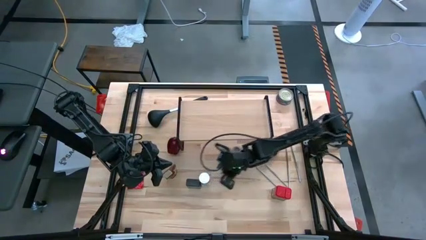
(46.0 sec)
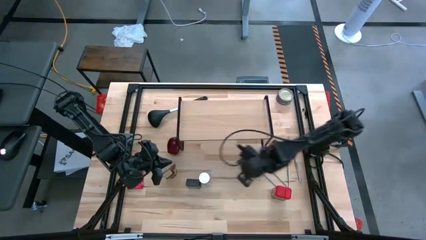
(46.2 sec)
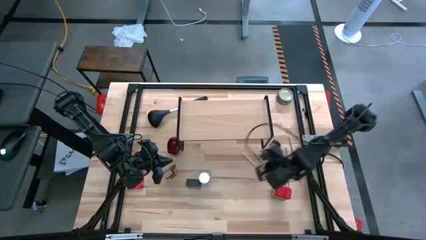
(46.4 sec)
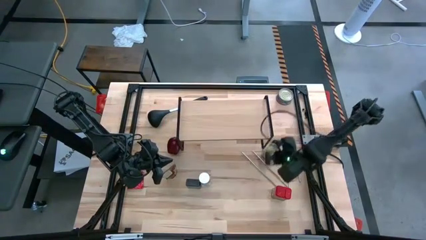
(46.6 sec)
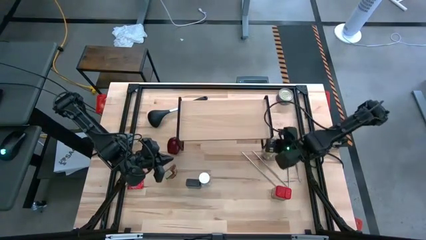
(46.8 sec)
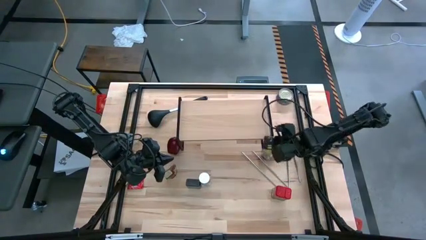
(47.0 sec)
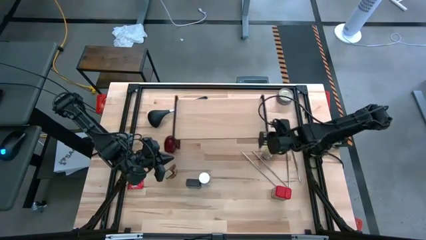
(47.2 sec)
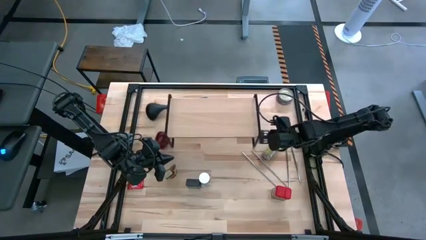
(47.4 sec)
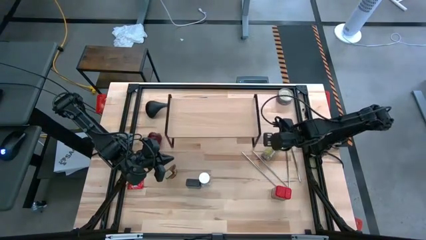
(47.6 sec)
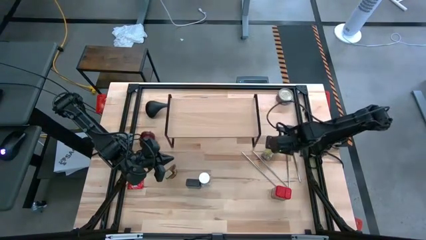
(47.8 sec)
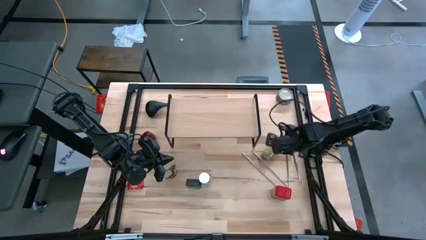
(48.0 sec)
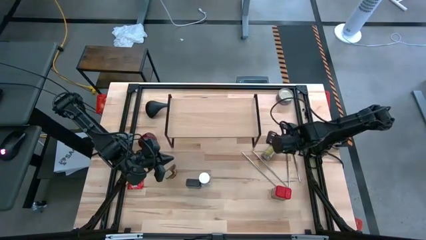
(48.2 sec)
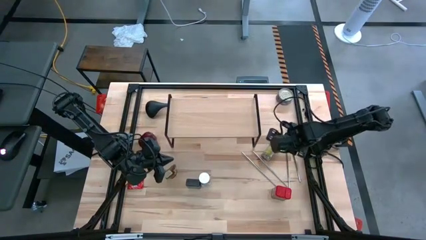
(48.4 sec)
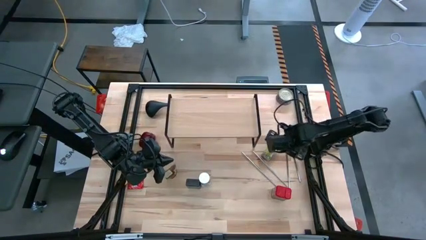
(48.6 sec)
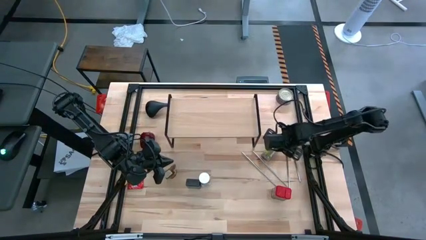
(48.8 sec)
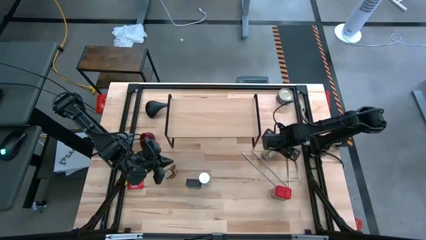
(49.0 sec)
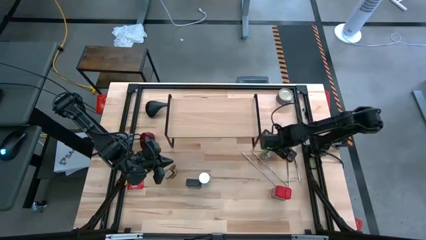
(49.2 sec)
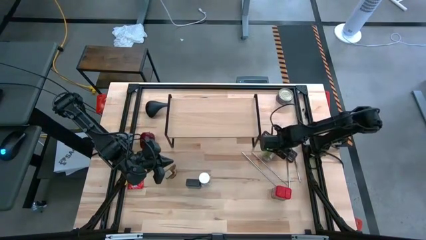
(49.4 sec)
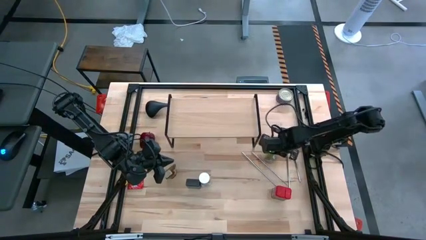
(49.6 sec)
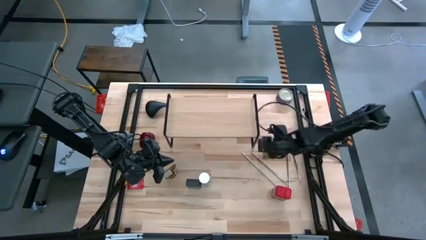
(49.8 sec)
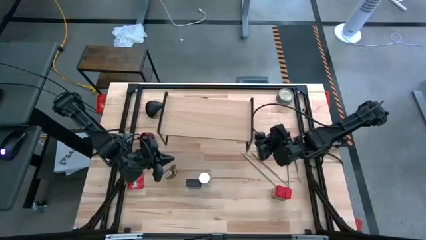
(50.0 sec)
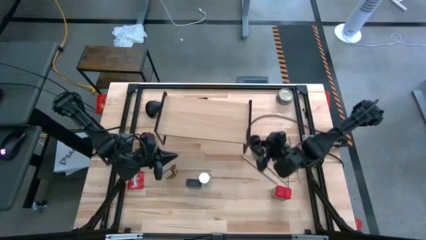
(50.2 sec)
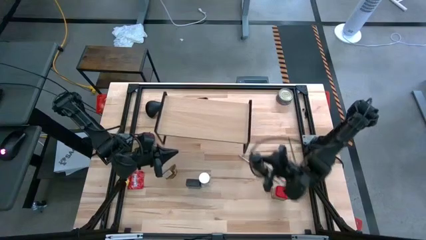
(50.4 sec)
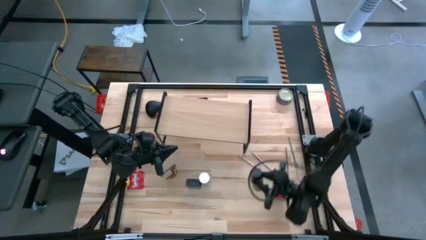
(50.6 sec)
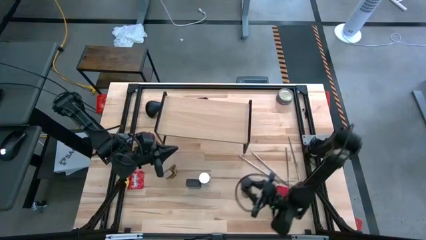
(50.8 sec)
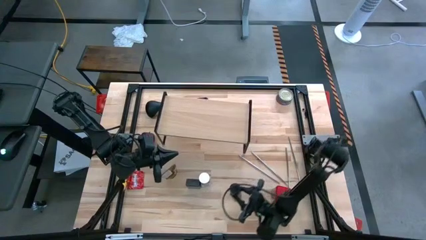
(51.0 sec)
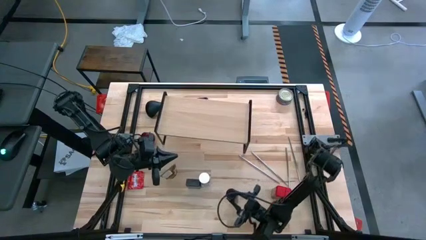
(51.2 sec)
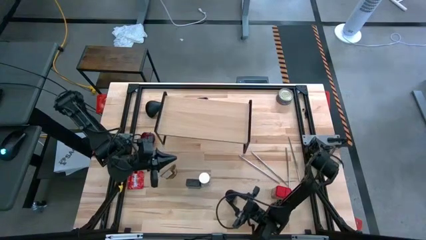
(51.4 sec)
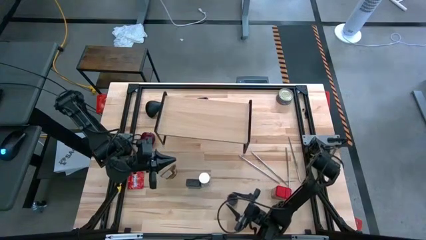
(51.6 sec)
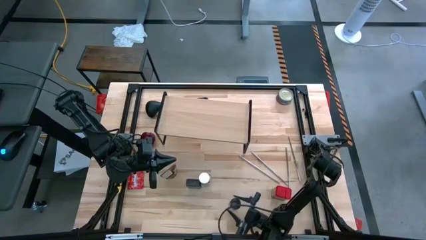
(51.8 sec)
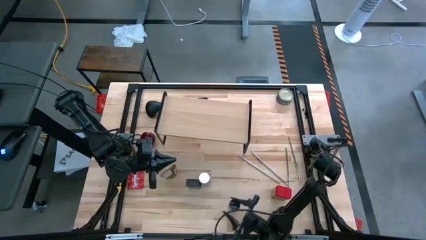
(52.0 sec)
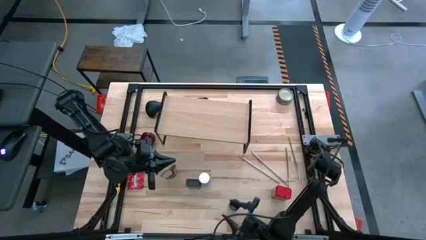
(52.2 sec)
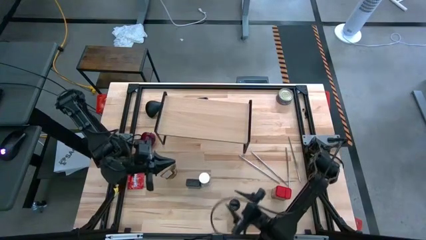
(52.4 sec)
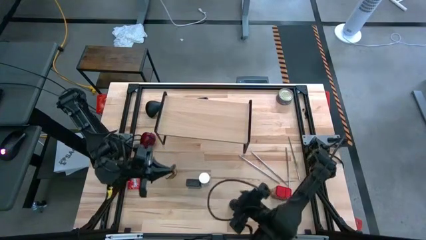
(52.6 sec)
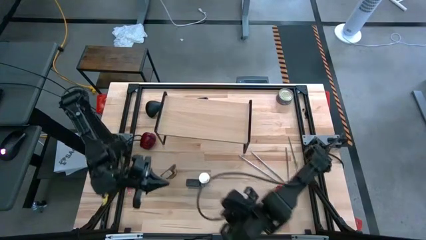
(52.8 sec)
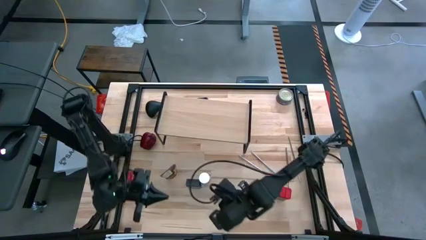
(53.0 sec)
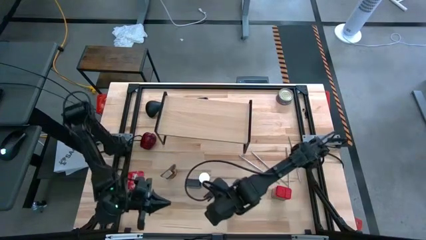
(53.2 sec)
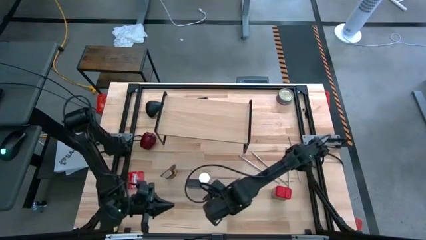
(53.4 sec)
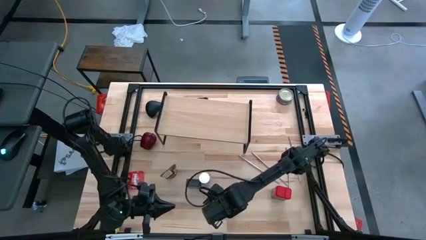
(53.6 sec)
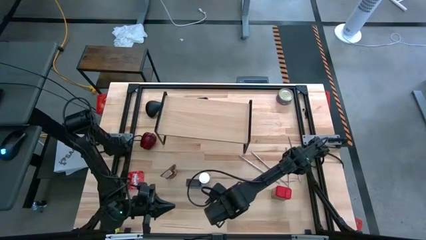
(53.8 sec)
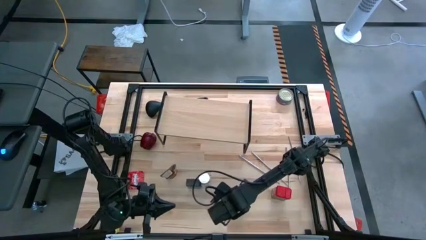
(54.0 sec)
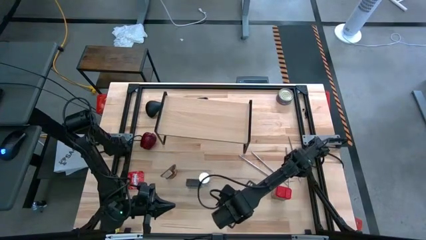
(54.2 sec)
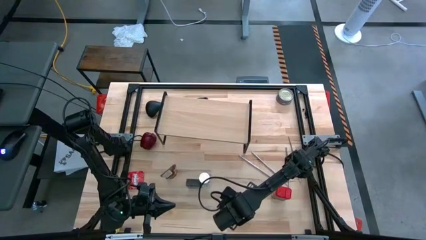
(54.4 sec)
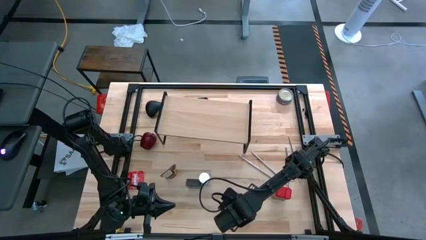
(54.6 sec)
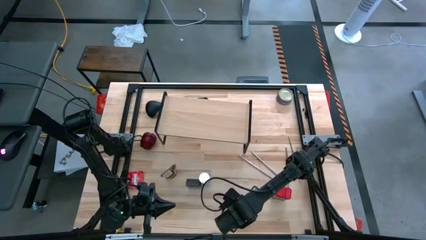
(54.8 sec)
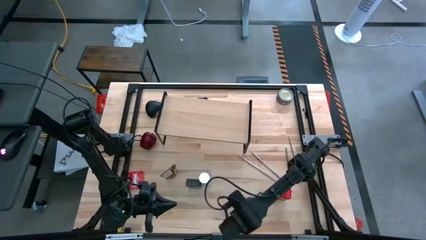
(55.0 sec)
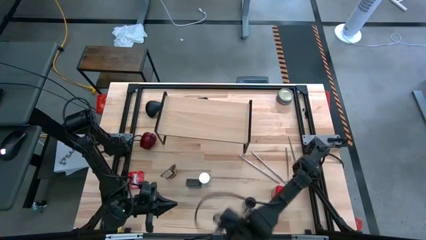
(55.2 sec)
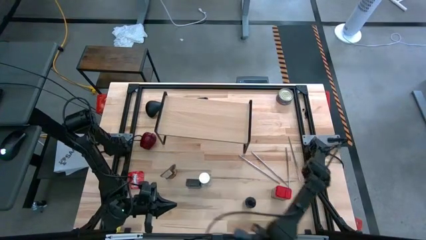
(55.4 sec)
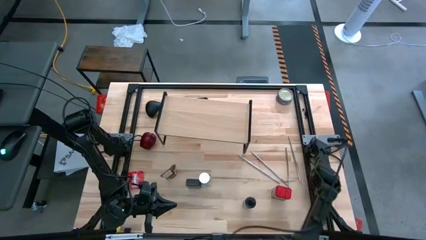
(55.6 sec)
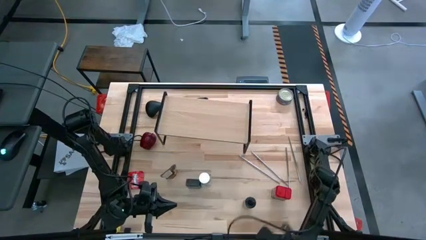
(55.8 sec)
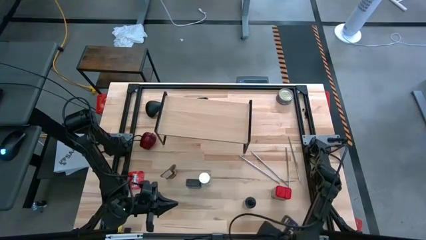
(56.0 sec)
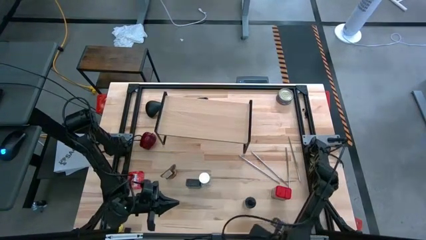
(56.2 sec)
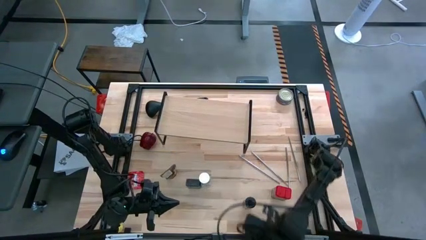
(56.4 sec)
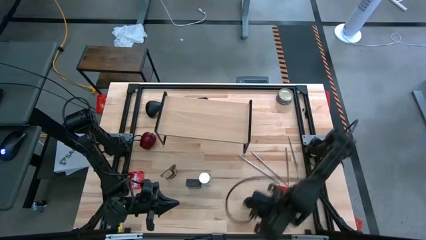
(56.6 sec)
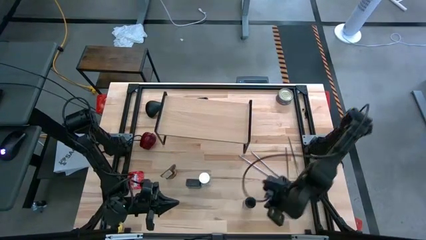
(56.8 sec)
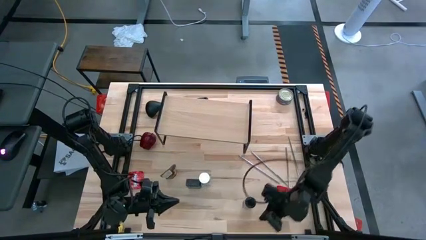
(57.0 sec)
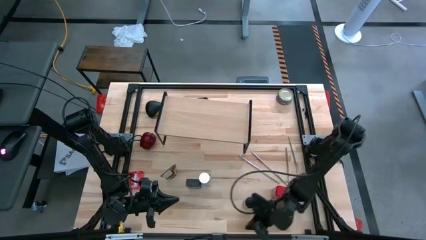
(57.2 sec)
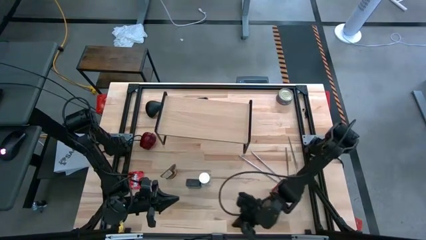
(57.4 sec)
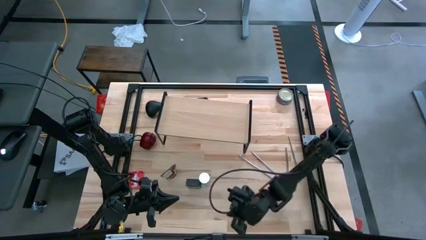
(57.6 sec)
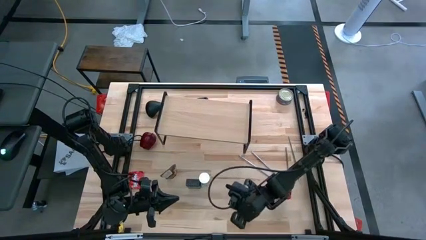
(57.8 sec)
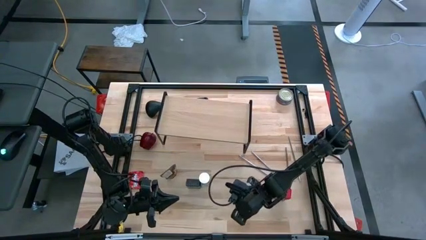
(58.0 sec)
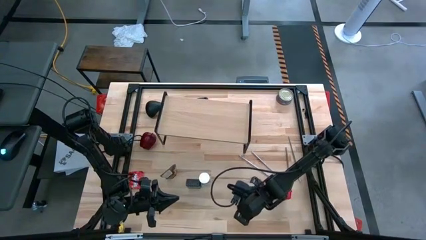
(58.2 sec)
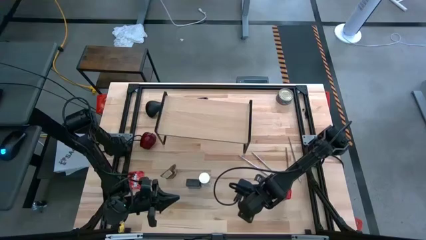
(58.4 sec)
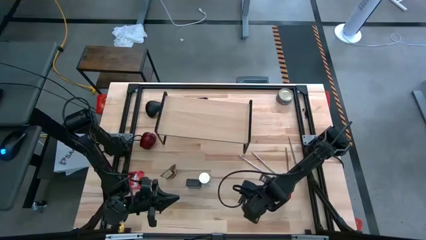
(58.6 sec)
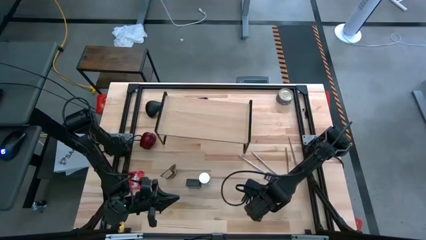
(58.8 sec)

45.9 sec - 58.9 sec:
Task: Shelf spices
Move the black seasoning bottle to the bottom right of the table

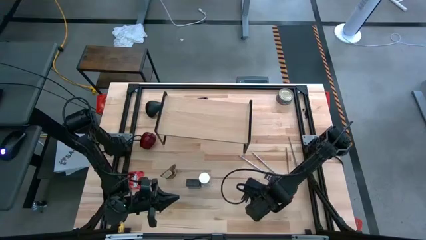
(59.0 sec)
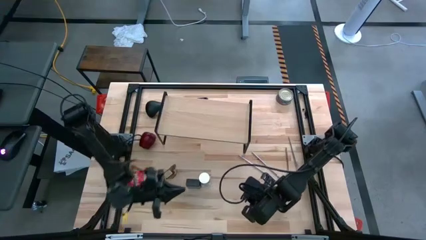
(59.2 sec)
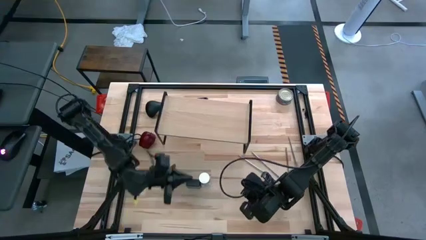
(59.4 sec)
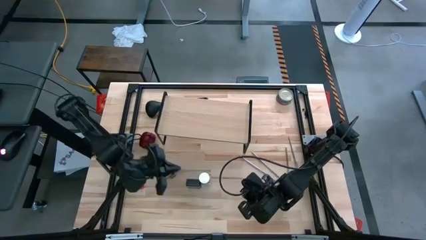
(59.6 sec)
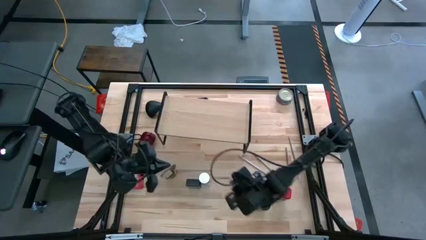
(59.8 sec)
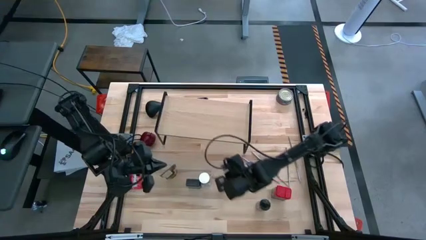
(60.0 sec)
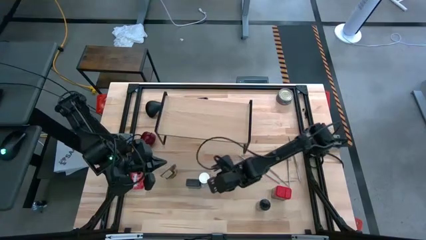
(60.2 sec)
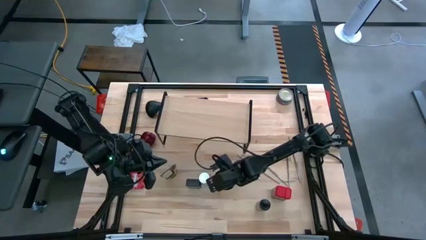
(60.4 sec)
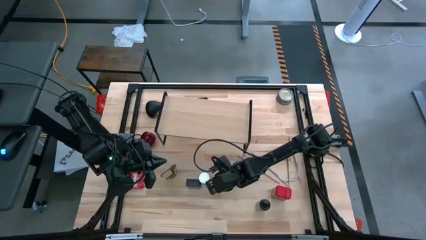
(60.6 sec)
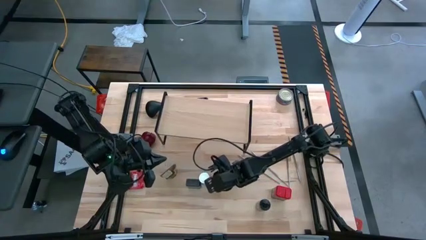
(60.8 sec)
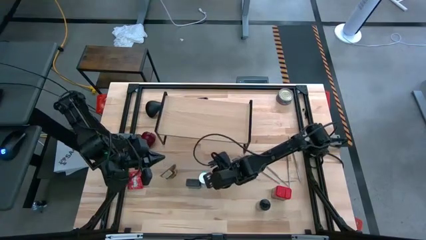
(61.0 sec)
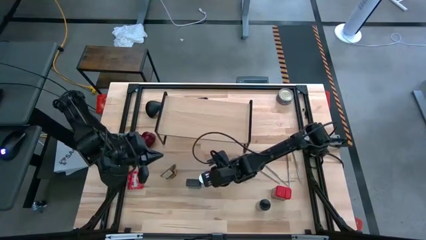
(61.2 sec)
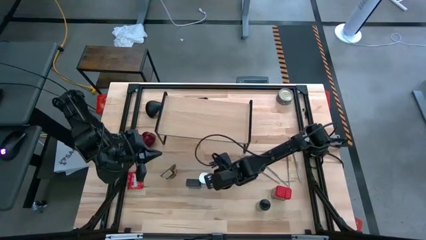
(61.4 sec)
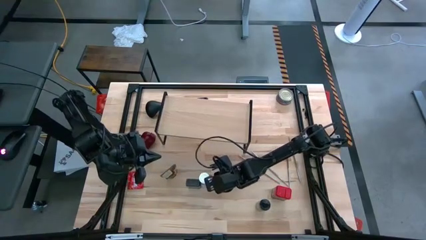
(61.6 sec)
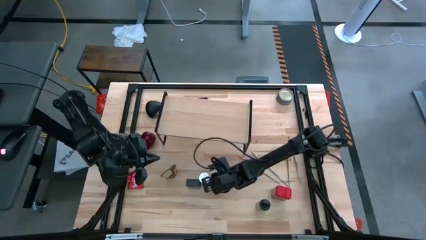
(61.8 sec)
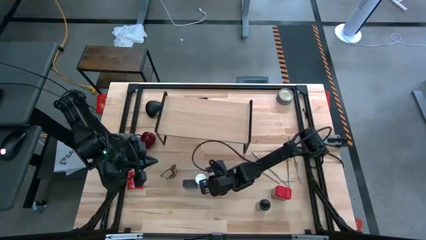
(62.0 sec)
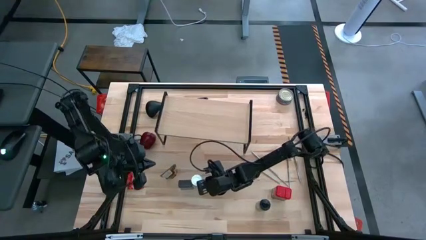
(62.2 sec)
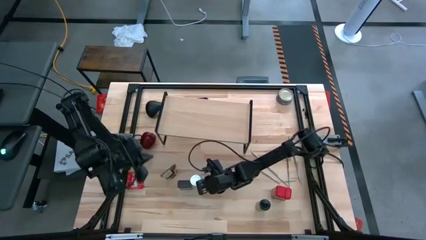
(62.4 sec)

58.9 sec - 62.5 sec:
Adjust the white seasoning bottle

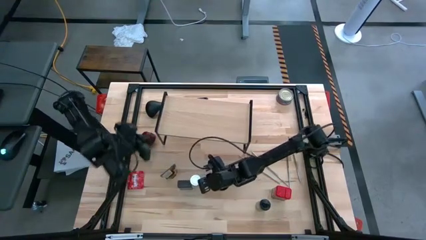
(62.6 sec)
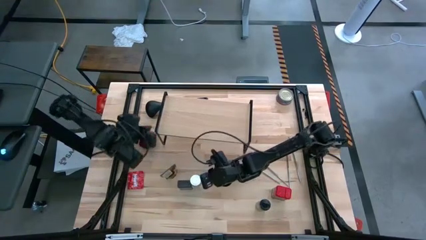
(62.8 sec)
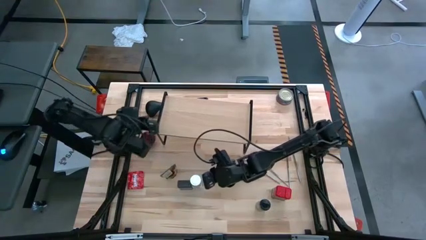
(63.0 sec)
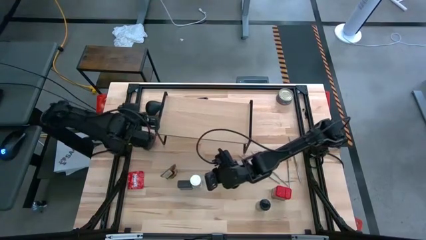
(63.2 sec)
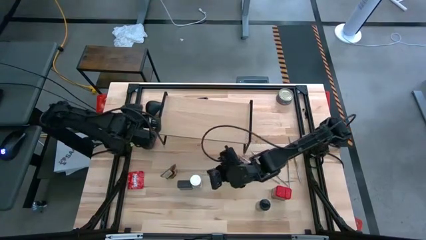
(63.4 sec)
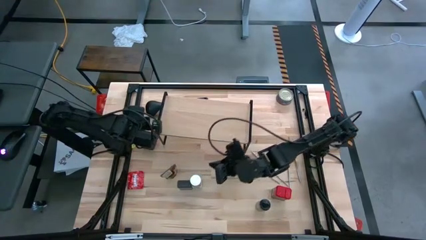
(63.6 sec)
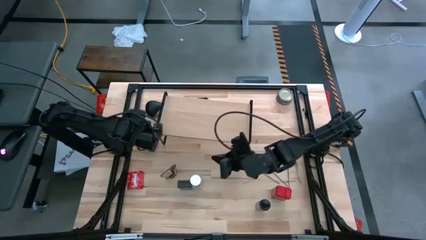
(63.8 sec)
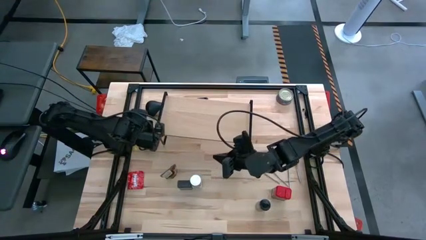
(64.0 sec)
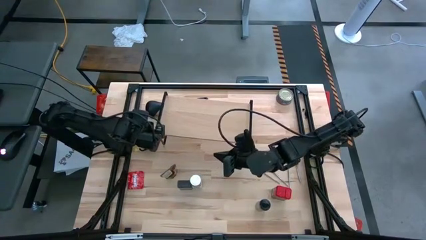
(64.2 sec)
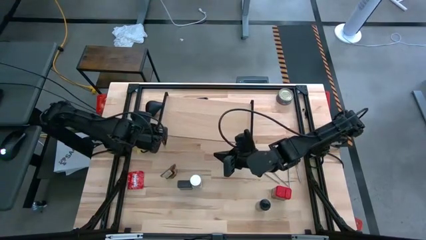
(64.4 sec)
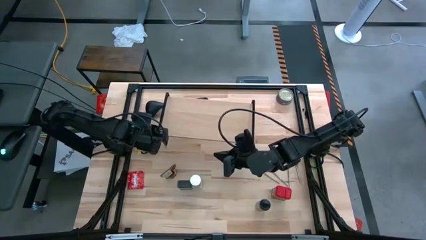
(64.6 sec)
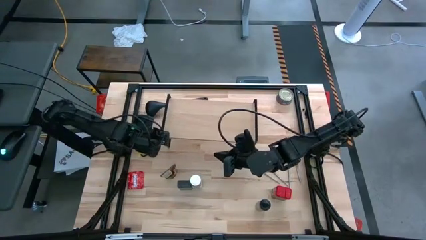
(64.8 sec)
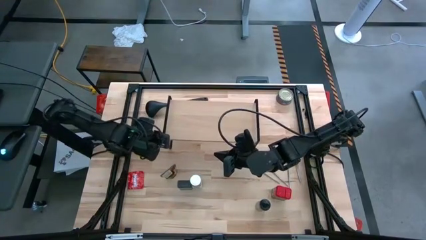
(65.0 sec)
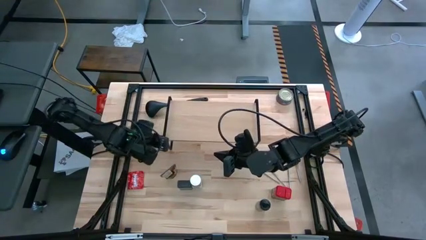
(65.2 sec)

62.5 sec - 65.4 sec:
Adjust the shelf
